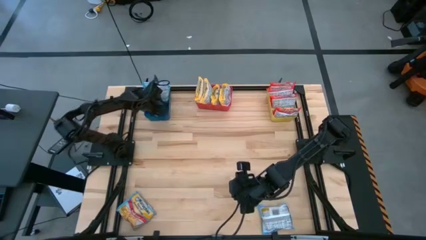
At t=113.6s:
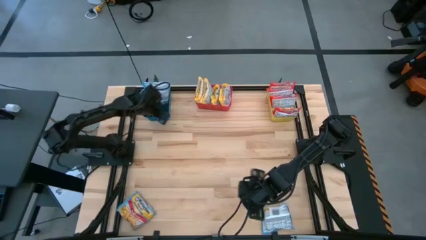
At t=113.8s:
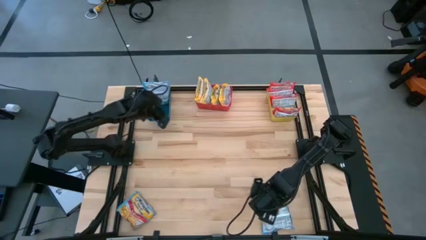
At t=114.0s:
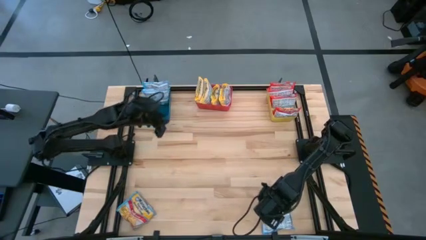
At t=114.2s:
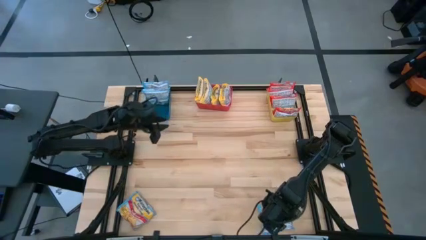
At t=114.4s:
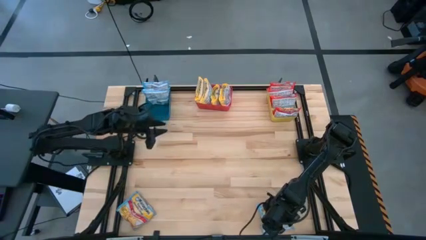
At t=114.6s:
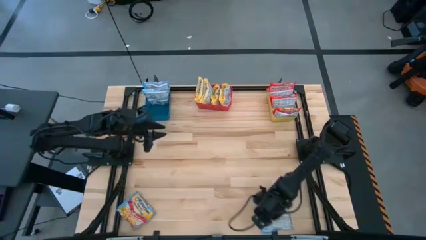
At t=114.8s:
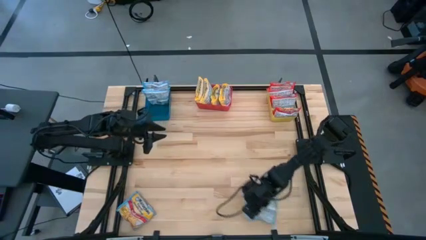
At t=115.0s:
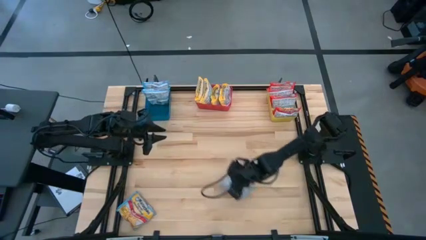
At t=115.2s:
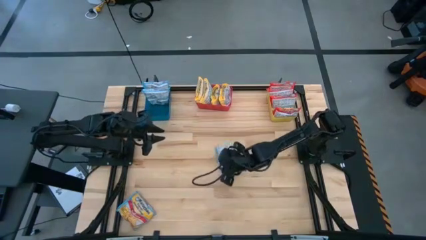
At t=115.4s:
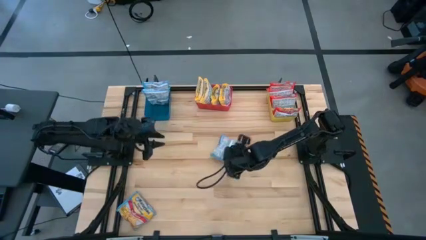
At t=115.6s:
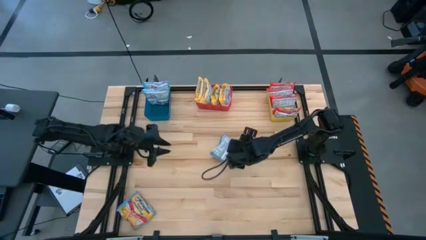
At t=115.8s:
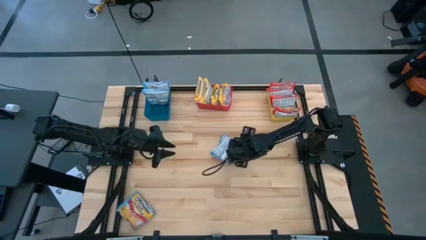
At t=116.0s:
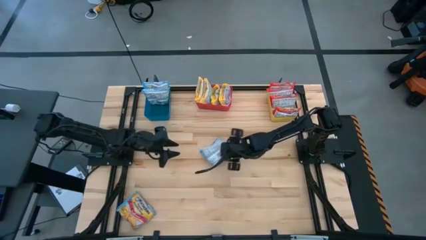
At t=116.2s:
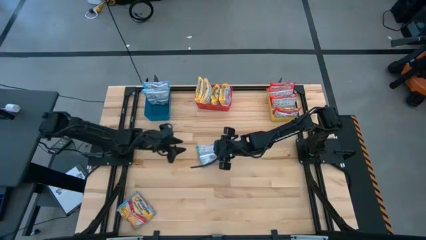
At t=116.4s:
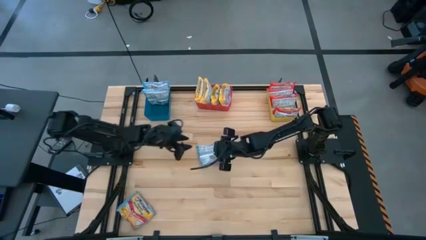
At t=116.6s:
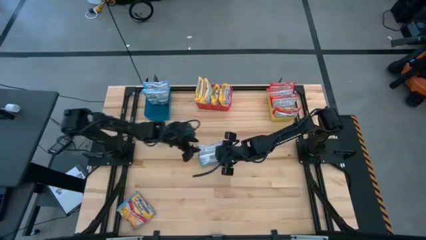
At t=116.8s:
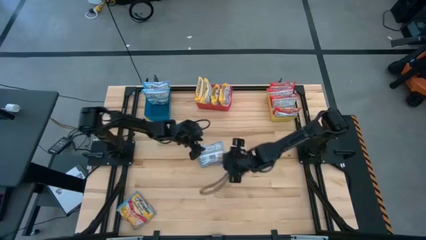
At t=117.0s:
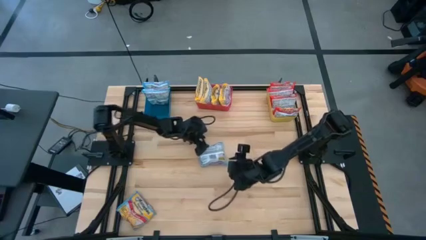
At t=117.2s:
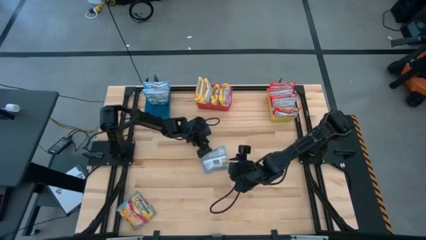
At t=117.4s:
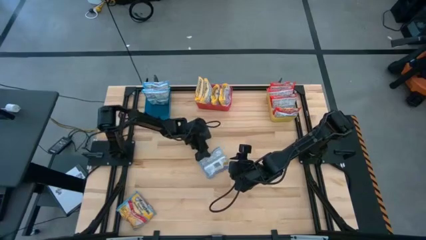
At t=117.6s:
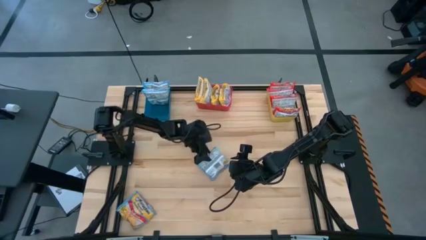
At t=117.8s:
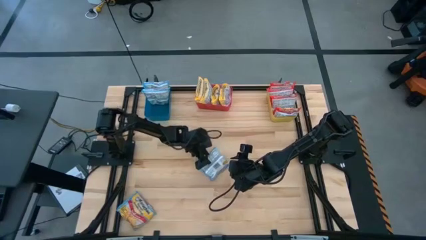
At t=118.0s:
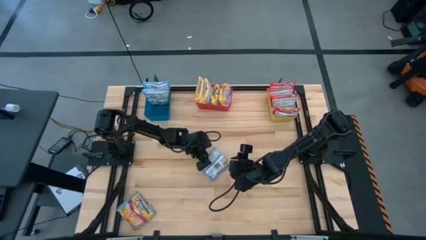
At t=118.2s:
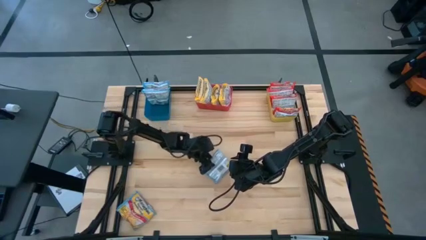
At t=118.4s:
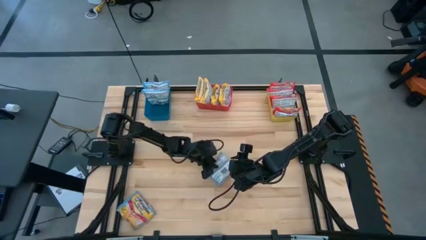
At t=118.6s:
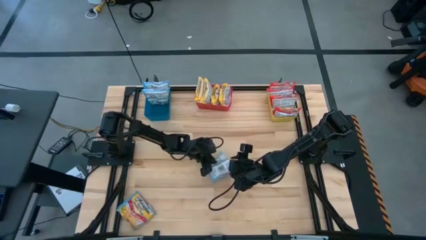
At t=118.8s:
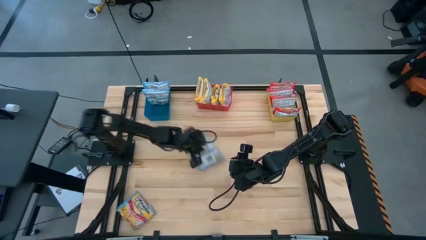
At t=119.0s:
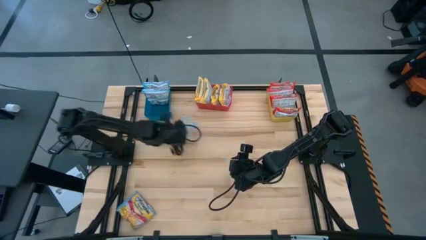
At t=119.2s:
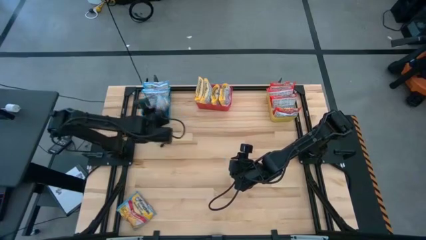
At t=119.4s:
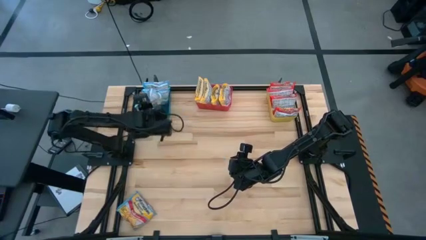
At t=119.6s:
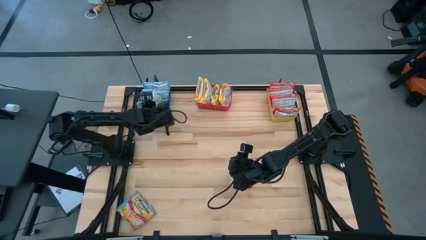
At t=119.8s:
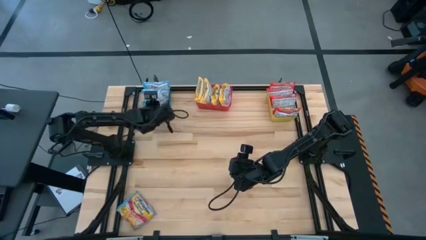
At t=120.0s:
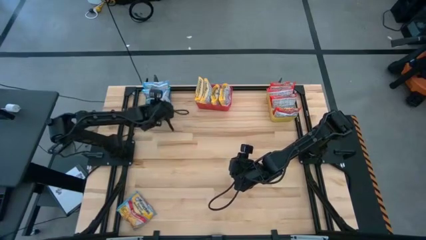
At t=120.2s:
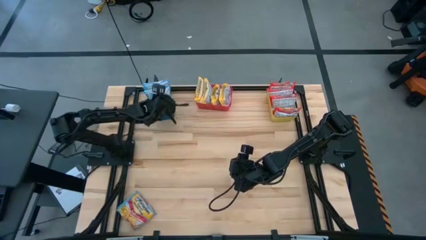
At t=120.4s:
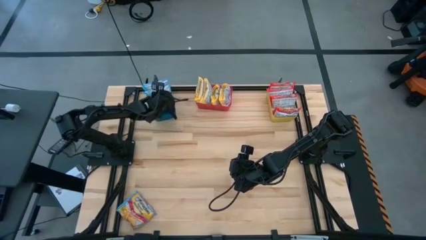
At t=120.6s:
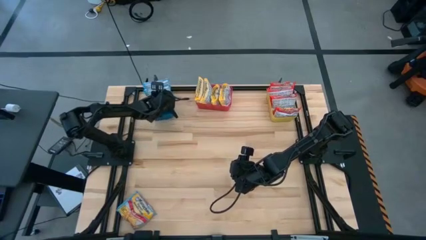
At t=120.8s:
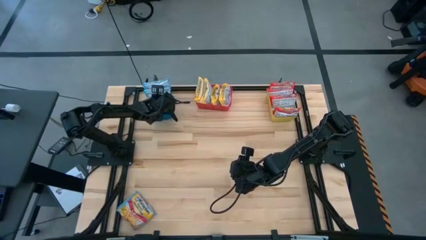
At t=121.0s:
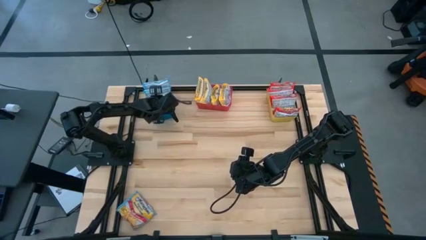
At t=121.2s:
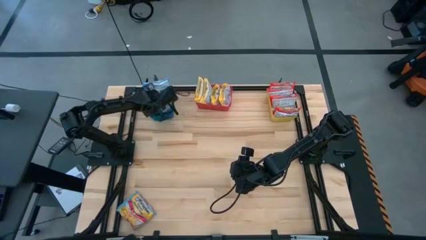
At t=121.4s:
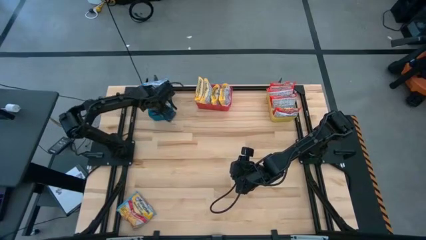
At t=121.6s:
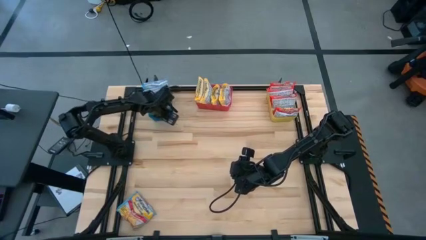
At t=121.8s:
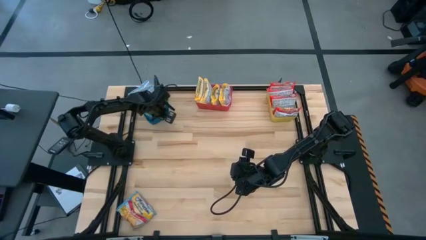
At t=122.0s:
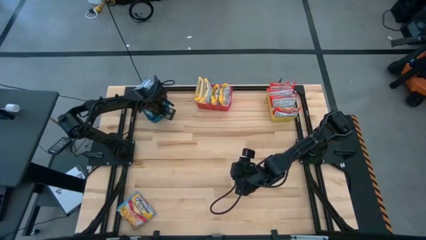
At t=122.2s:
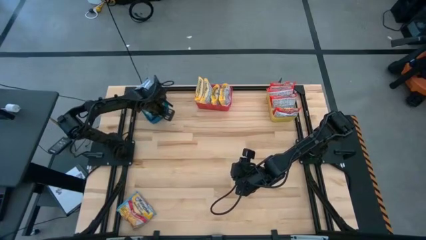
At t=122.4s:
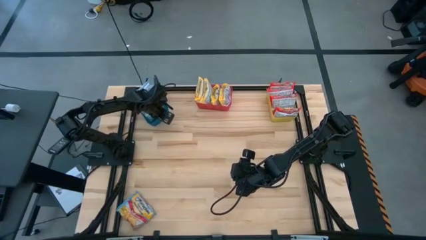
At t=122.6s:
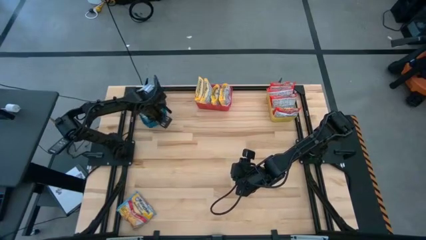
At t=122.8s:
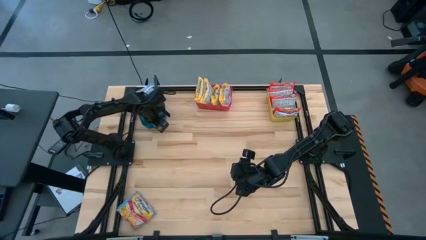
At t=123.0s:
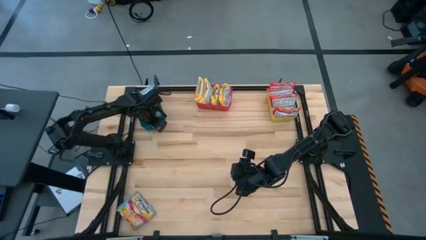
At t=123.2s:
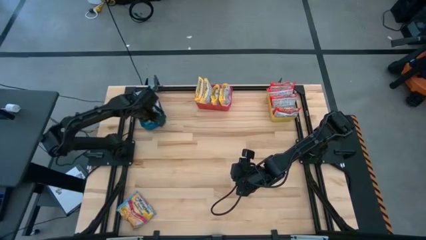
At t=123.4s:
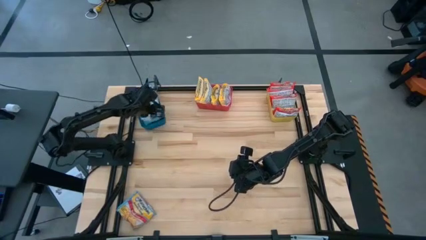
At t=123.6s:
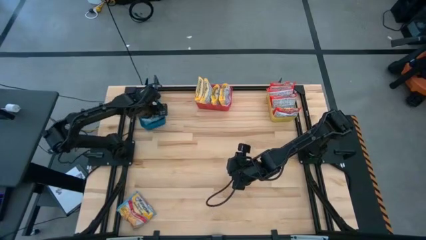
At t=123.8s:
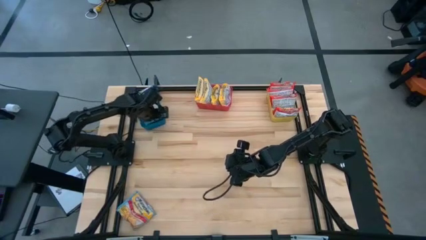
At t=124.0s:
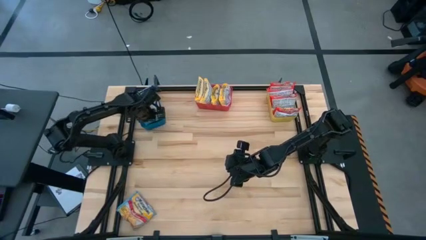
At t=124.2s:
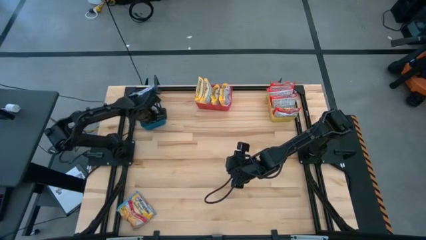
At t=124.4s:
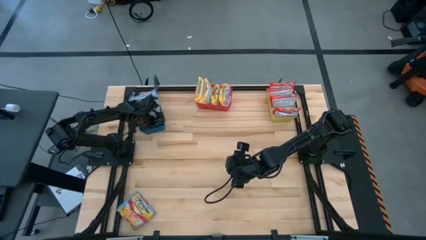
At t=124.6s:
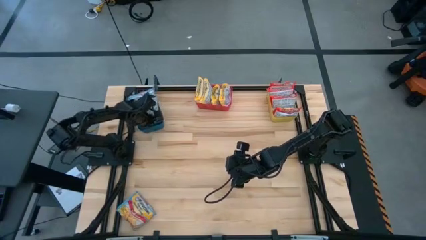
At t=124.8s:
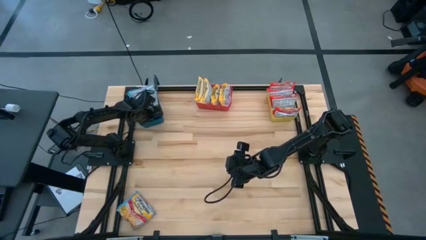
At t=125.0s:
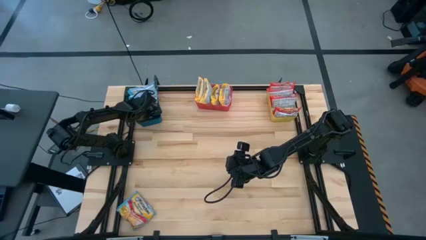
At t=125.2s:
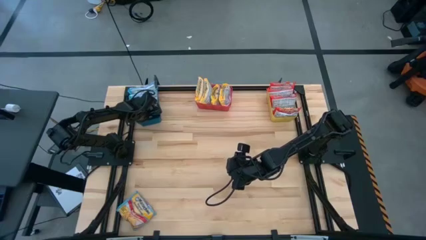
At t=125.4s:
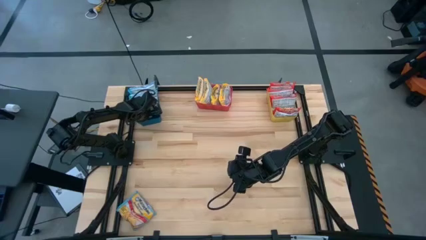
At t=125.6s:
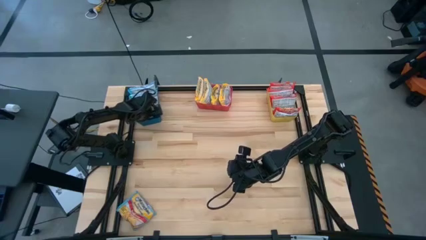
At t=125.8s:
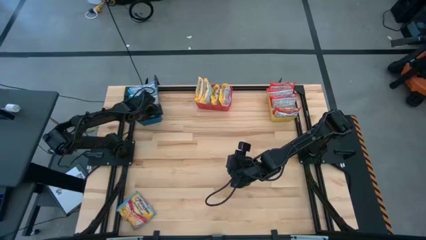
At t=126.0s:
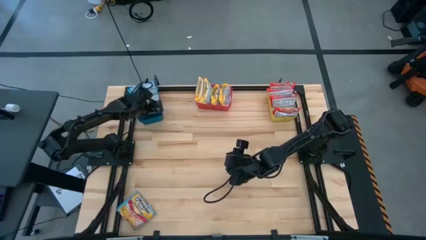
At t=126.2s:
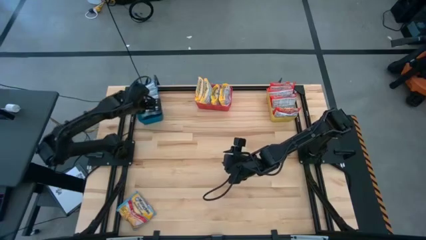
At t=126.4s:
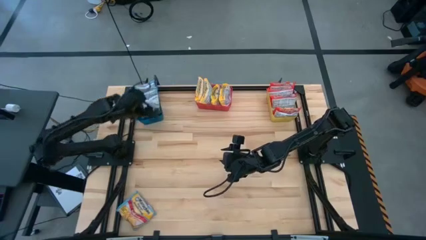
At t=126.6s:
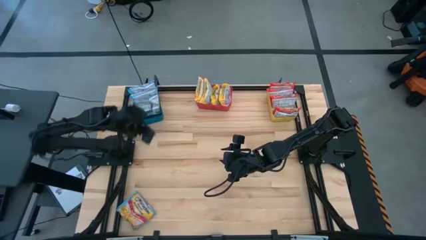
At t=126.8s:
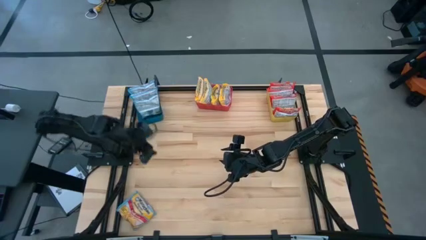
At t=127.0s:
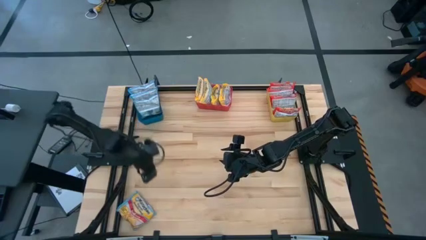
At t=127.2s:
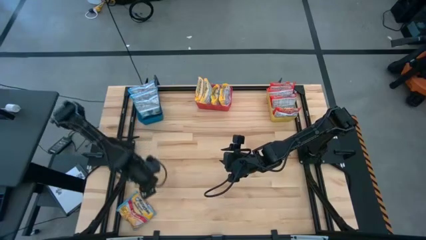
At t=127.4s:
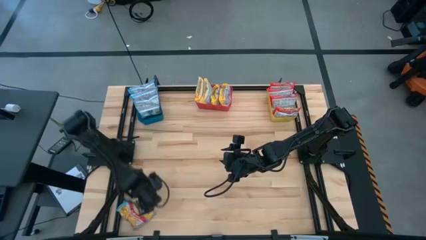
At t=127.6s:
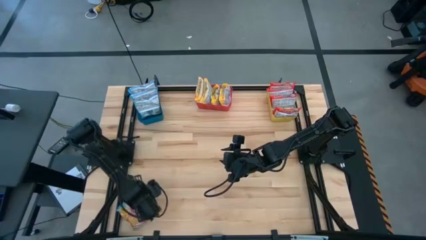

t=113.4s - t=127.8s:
Task: Sort Maruchan noodles
Put the right blue noodle pack into the blue bin
